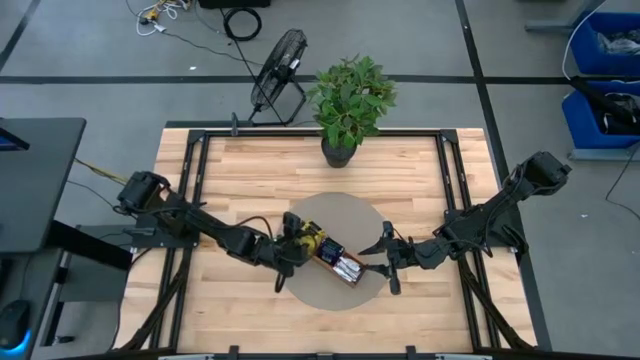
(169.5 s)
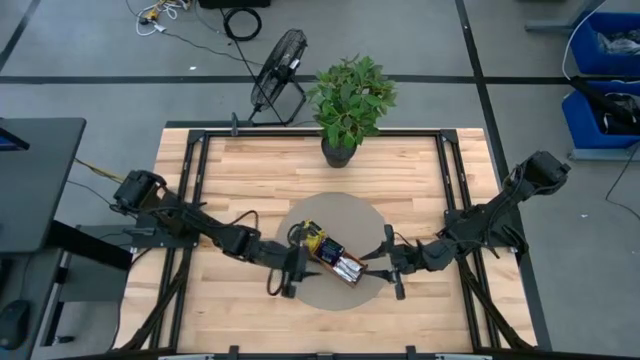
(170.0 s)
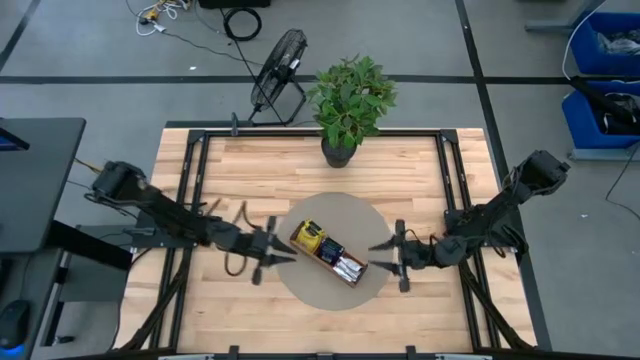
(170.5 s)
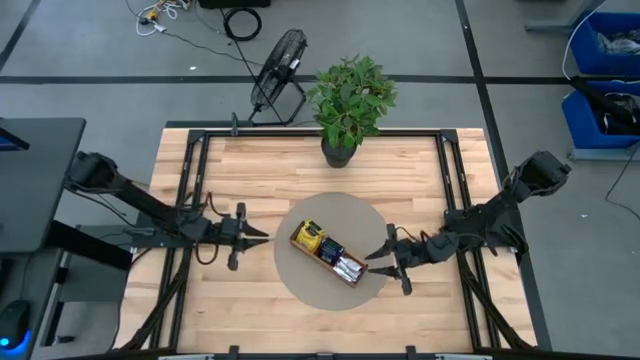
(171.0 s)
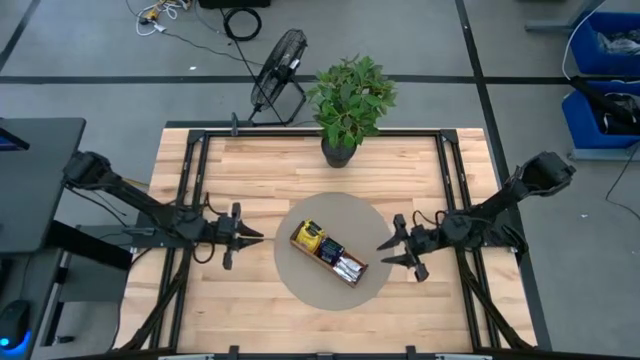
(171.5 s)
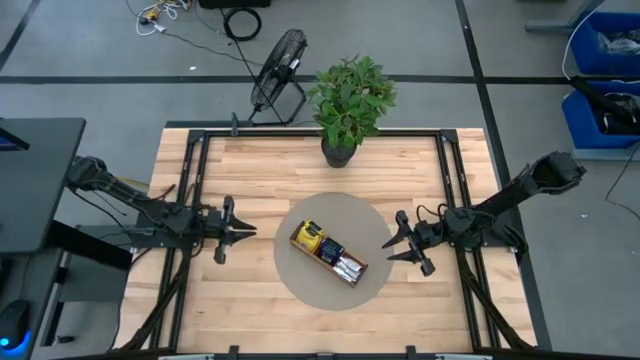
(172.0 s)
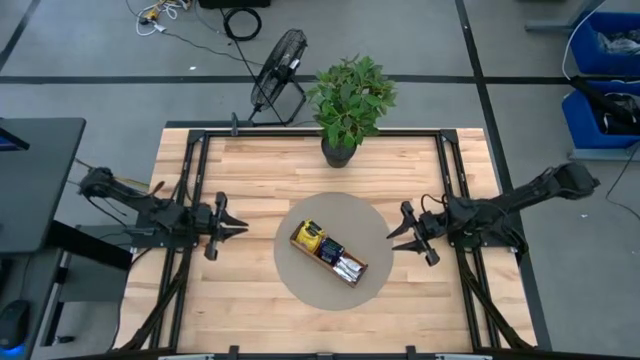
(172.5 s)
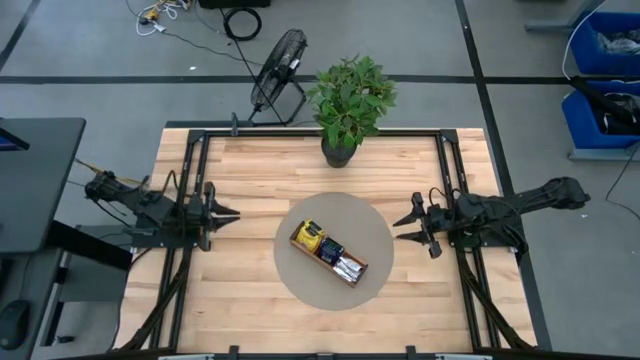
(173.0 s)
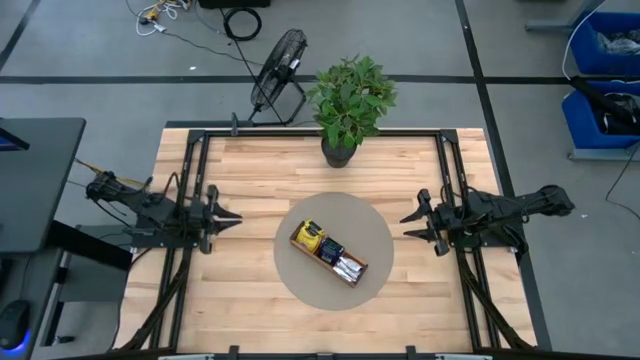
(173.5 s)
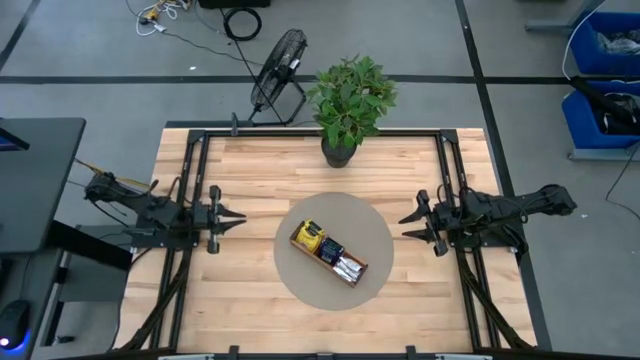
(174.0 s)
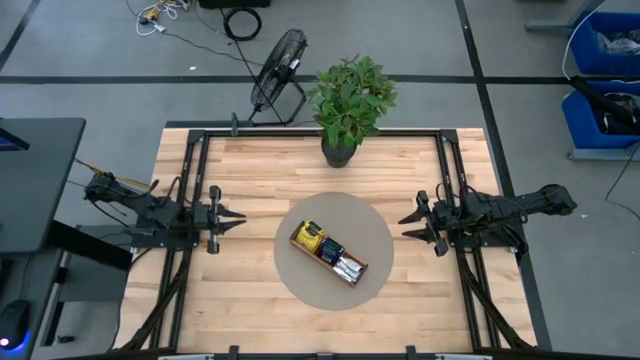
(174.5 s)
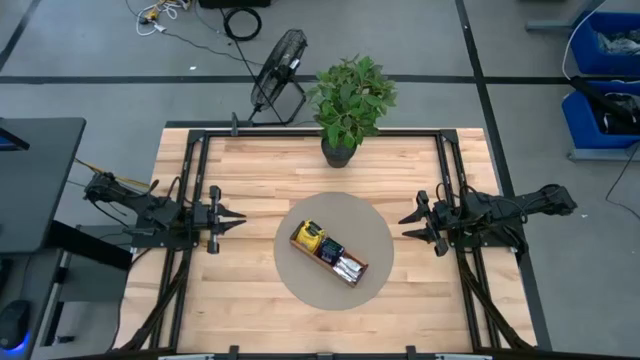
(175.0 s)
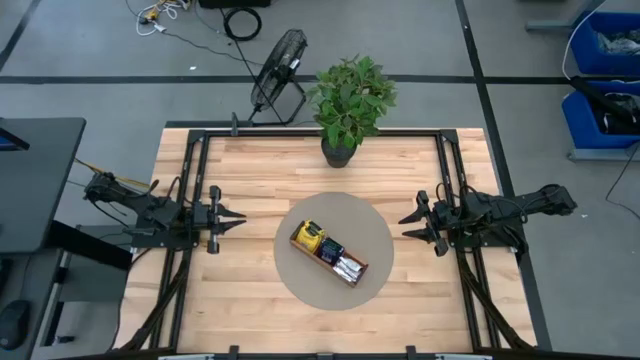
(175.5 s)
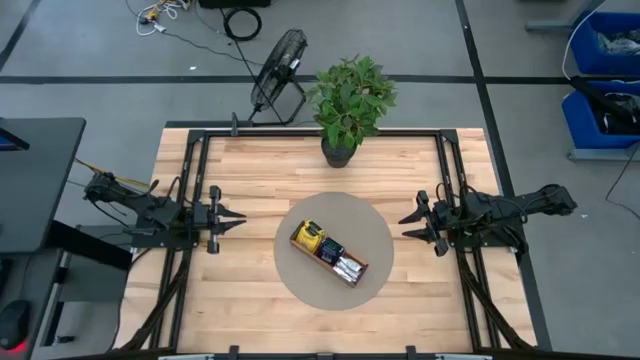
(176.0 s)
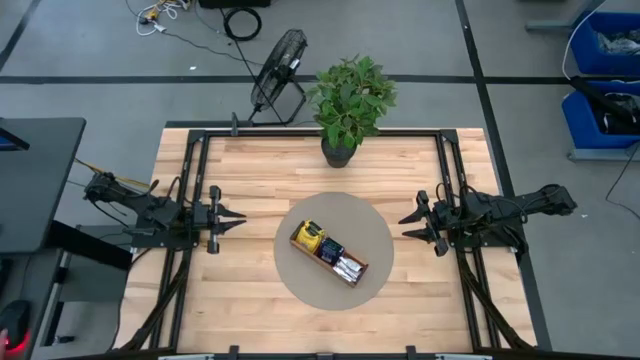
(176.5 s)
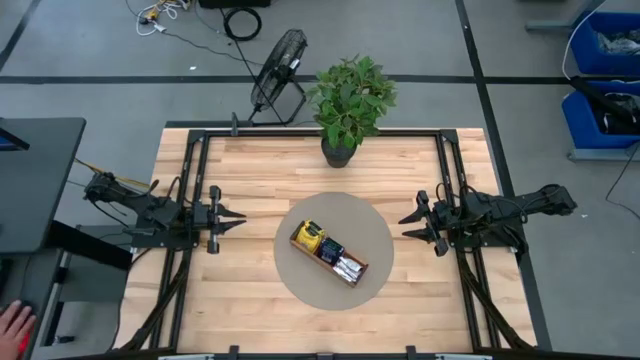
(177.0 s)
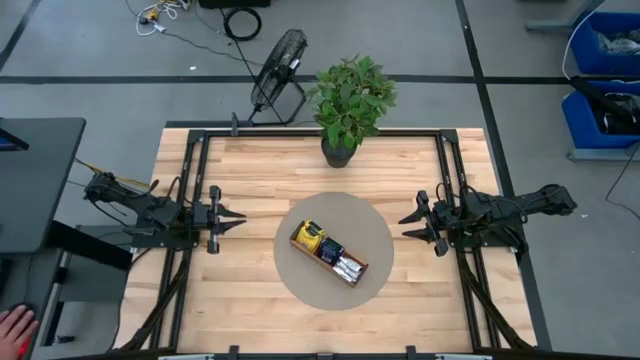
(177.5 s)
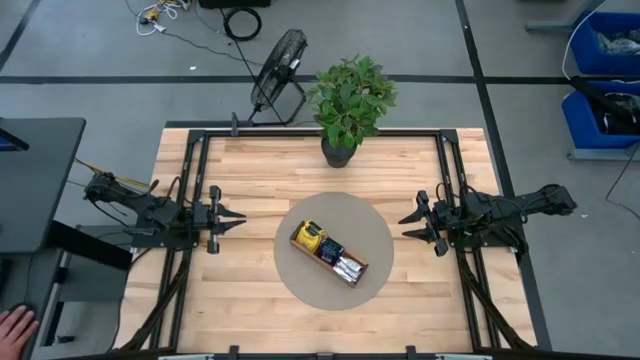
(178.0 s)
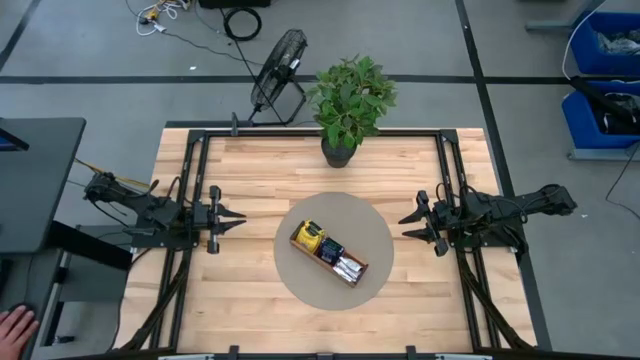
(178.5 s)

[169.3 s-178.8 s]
Task: Pick & Place Tea
Return to Home Position

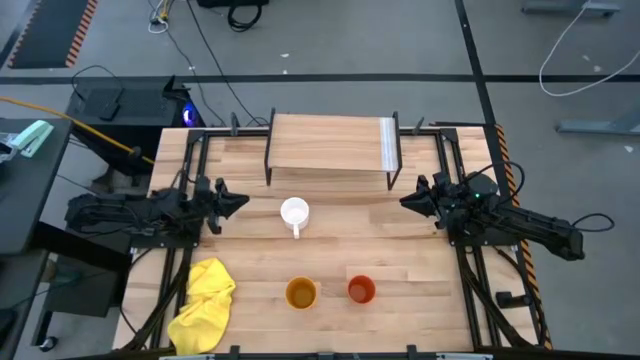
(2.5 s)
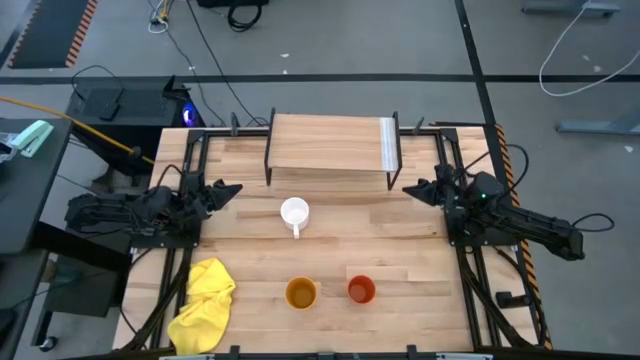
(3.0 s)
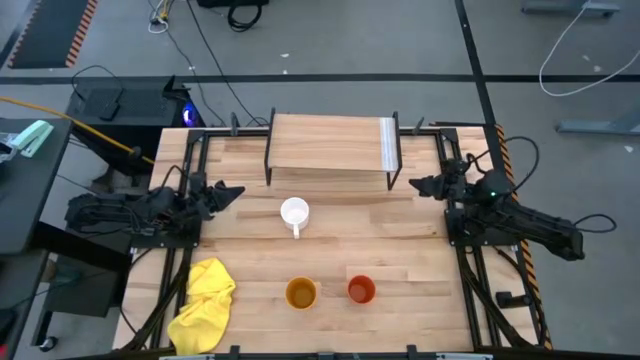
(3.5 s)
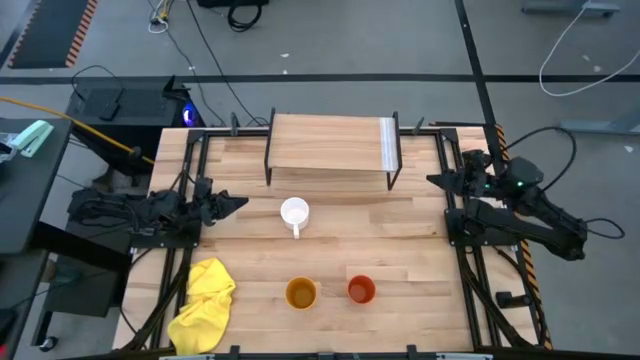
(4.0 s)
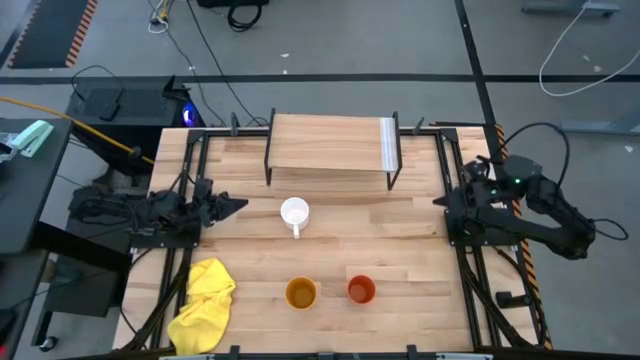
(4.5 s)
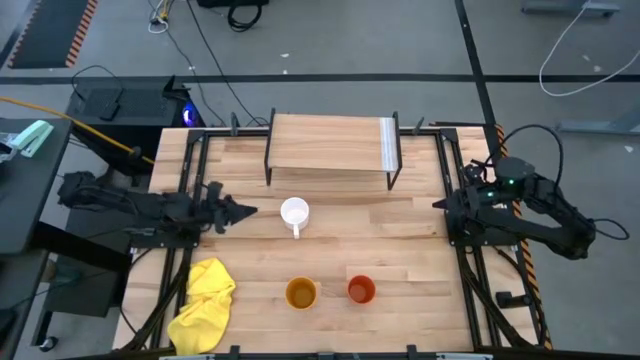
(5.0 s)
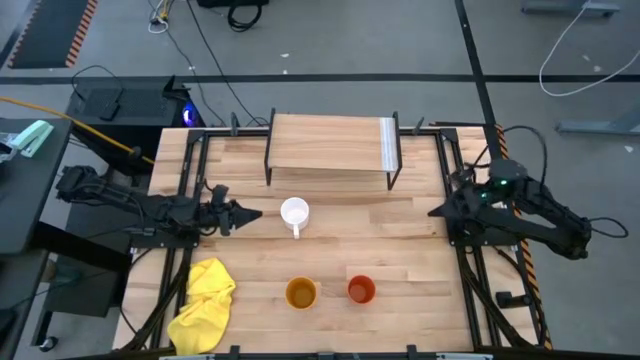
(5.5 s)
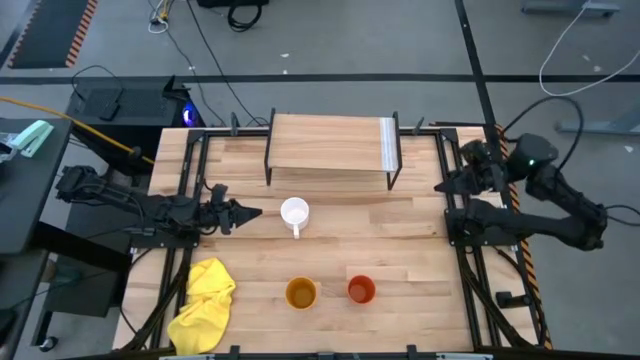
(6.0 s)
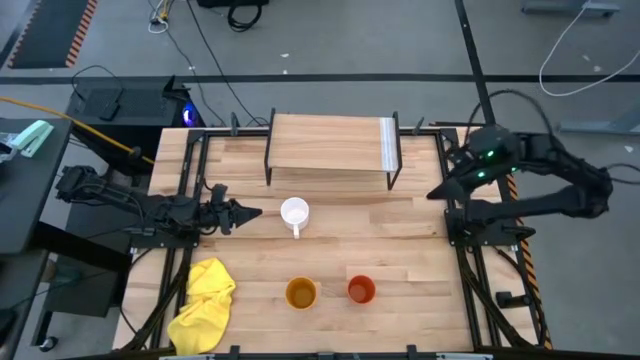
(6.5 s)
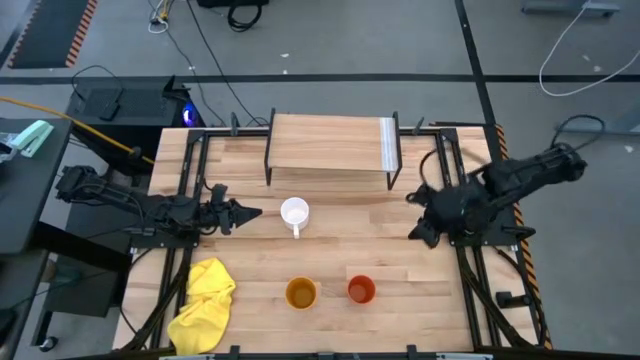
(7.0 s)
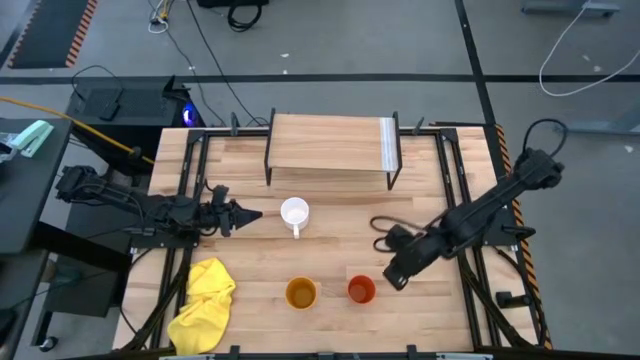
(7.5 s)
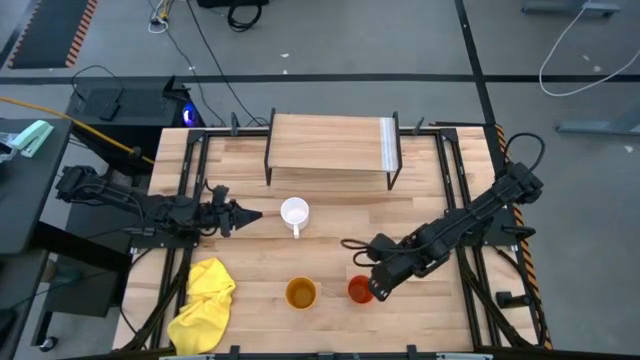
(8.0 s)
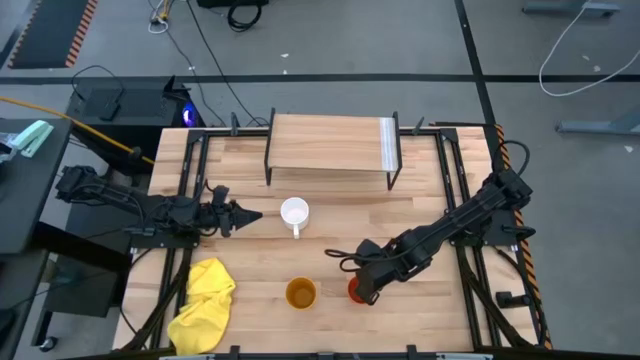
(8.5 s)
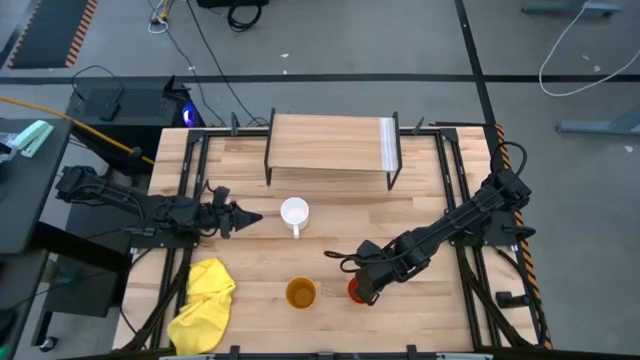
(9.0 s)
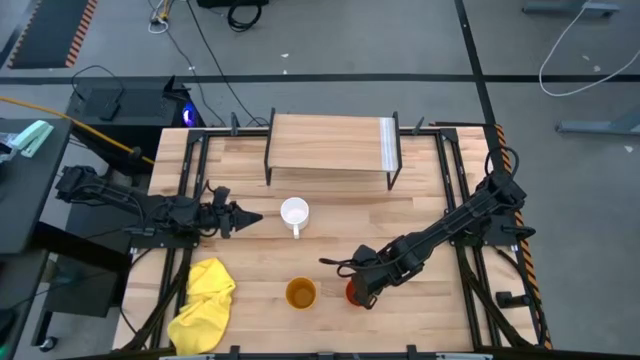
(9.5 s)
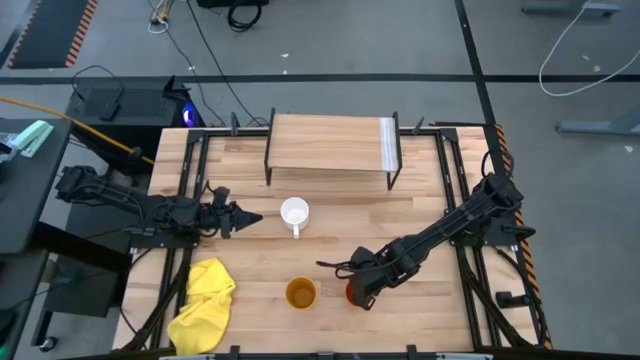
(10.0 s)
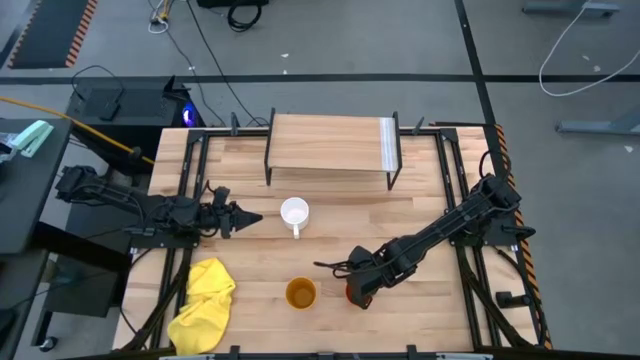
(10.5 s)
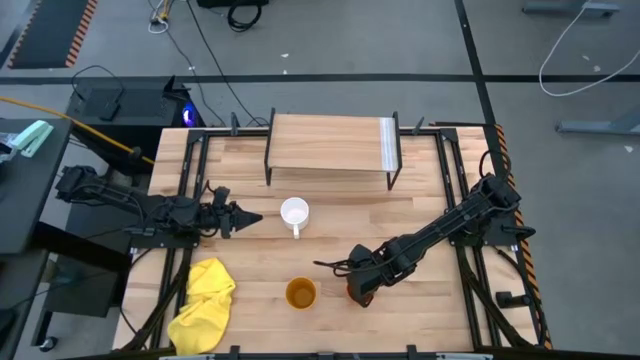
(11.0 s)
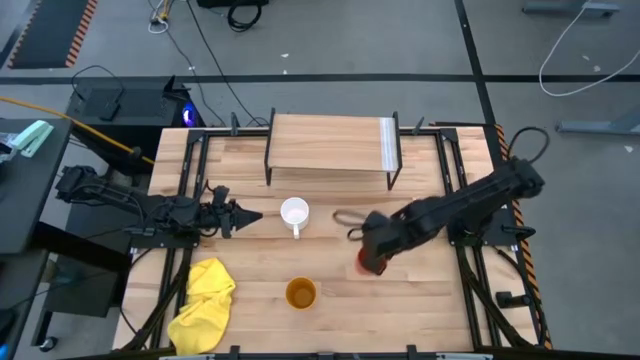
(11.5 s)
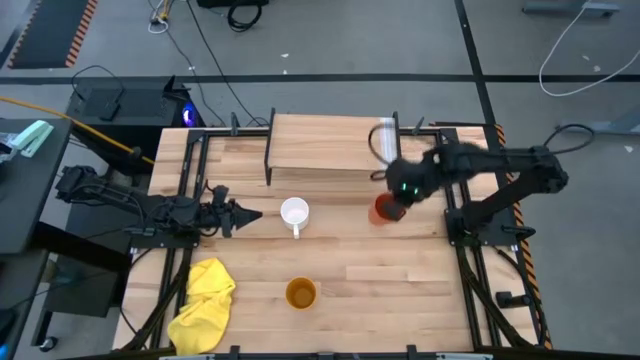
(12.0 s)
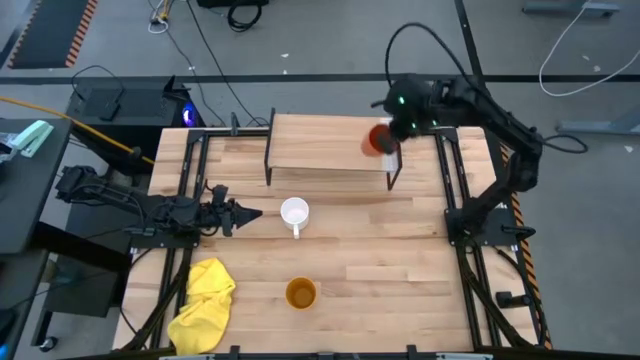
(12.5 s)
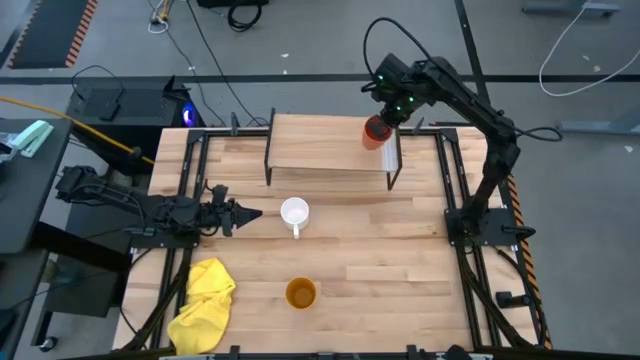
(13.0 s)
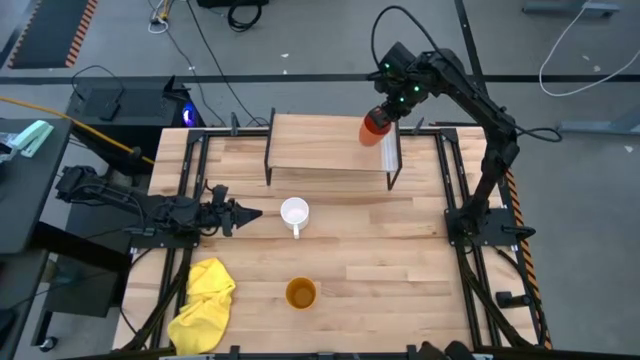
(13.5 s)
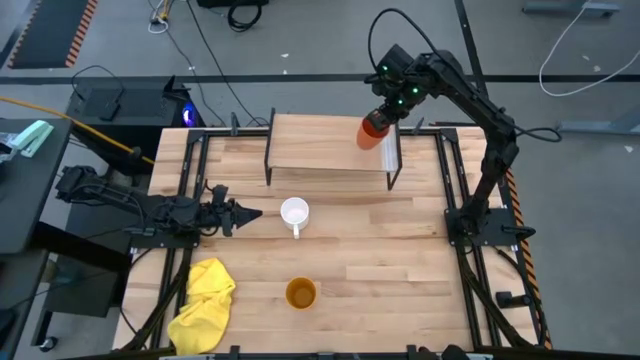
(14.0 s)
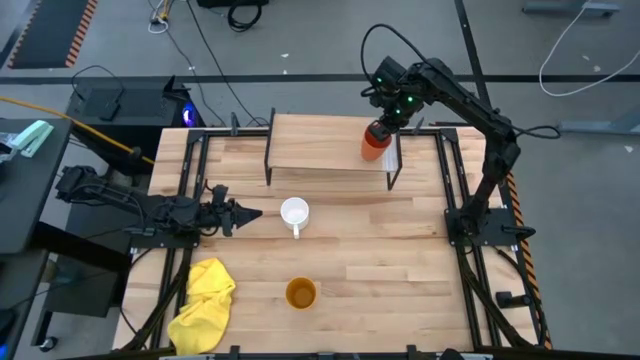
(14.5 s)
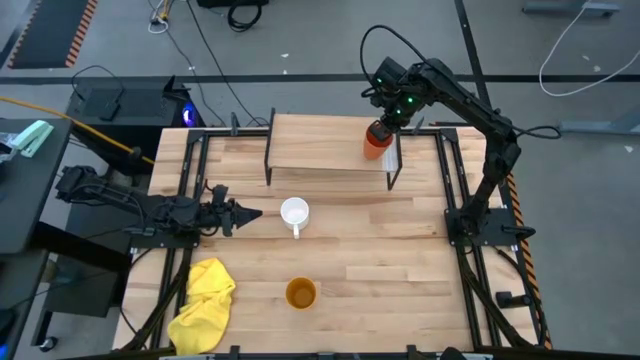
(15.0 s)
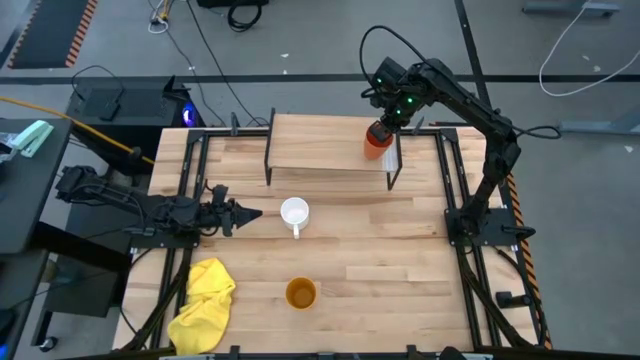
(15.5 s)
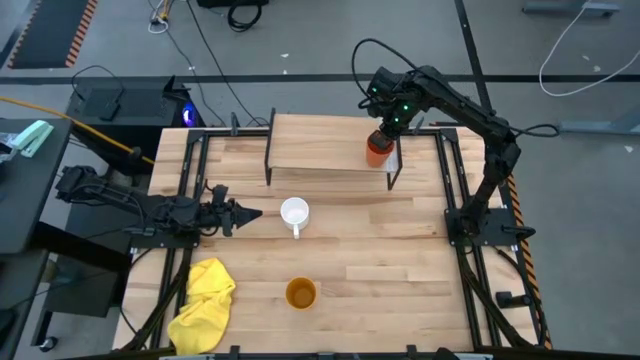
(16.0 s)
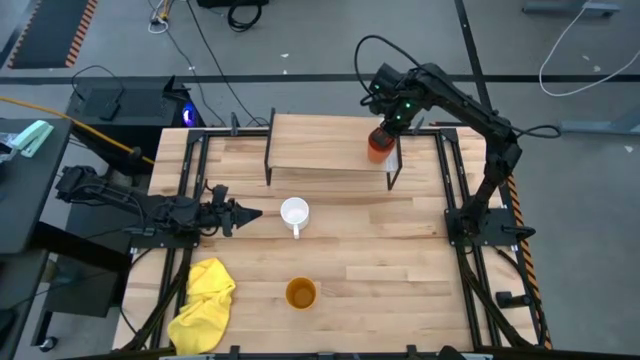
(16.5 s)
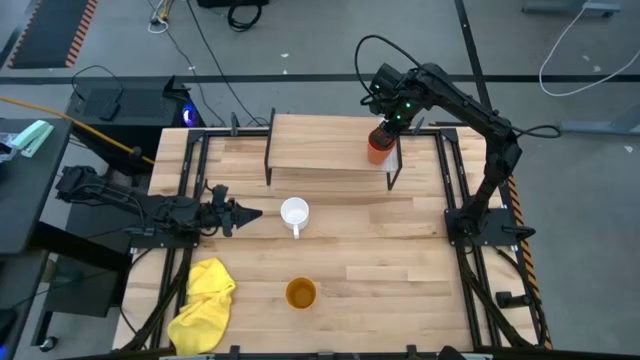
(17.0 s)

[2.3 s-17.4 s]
Task: Stack small to large cups/mugs on shelf
Put the orange cup on the shelf
